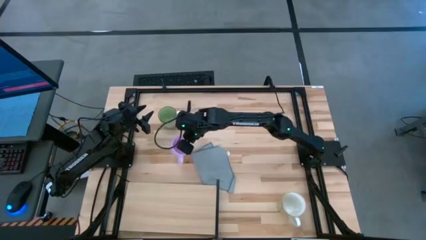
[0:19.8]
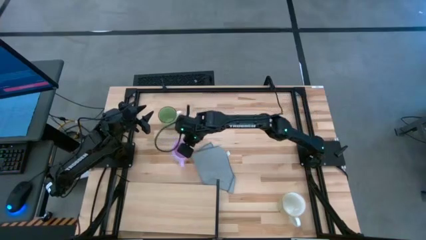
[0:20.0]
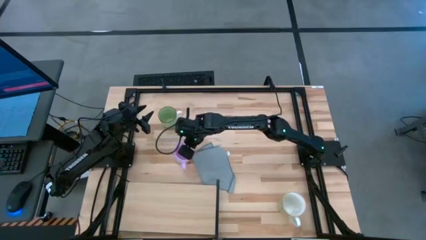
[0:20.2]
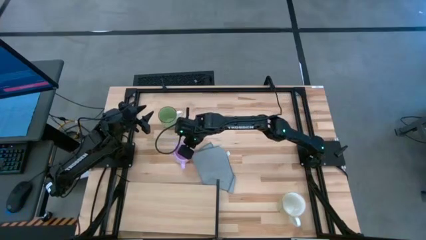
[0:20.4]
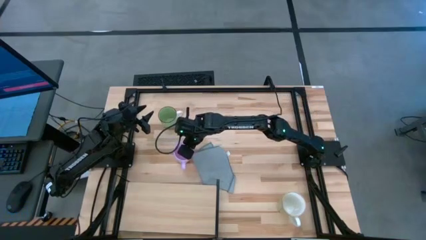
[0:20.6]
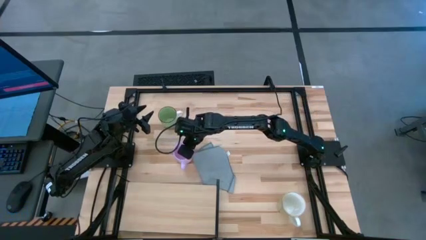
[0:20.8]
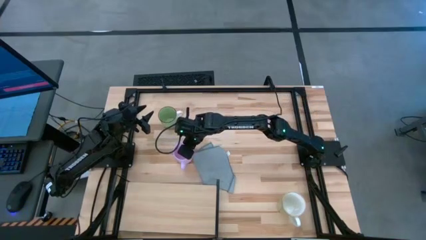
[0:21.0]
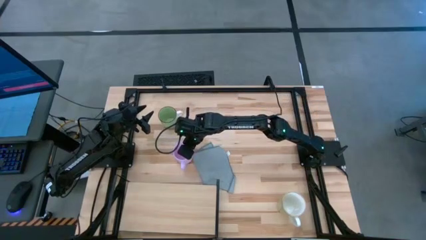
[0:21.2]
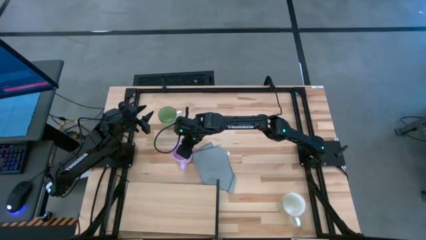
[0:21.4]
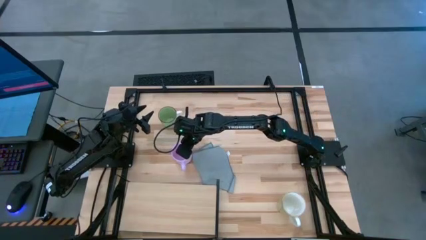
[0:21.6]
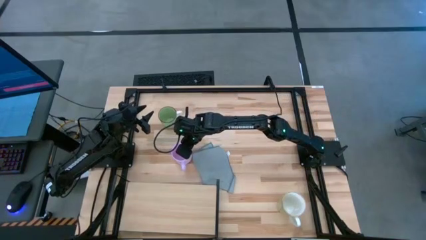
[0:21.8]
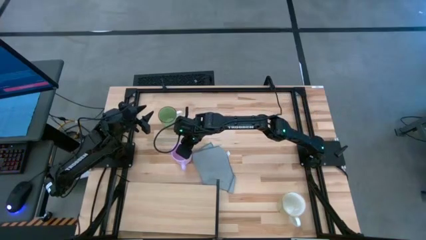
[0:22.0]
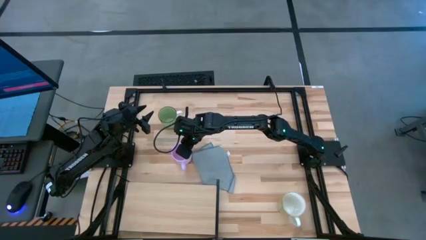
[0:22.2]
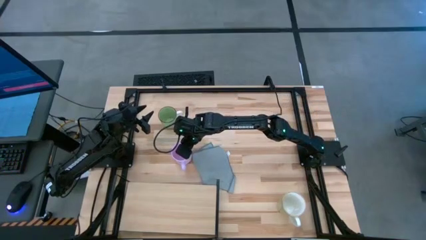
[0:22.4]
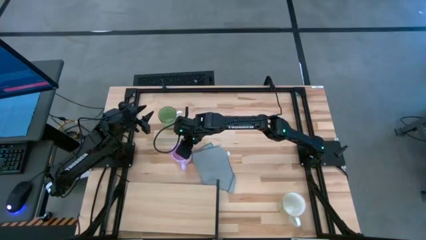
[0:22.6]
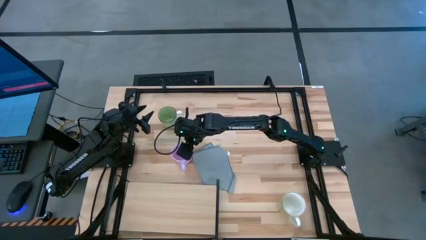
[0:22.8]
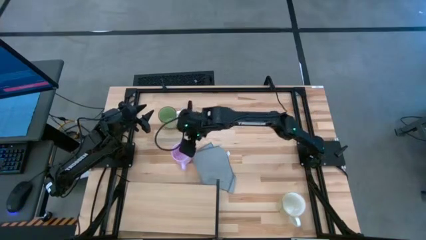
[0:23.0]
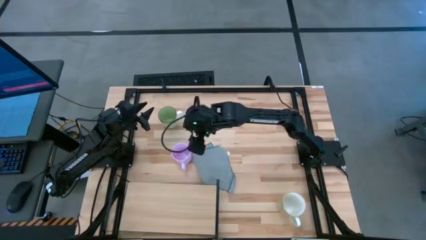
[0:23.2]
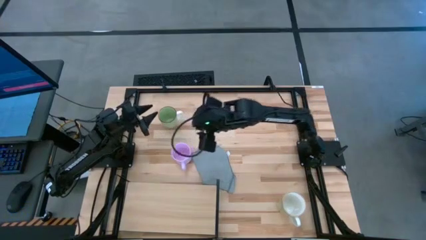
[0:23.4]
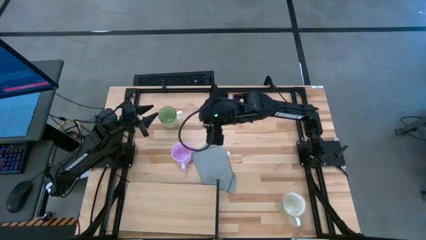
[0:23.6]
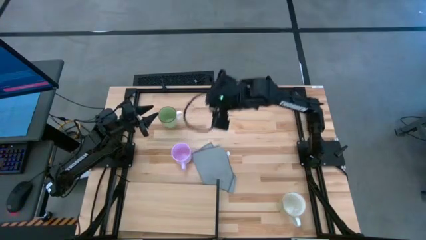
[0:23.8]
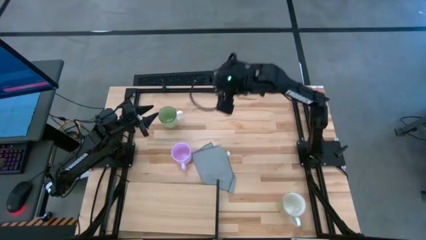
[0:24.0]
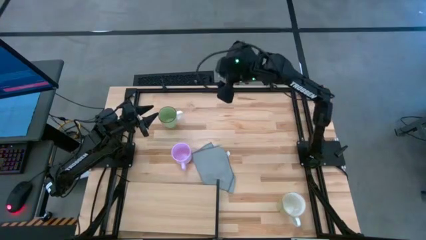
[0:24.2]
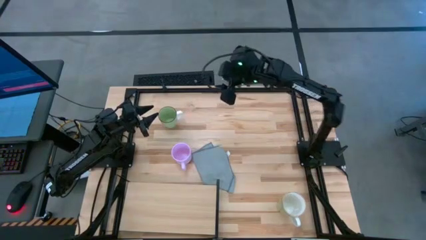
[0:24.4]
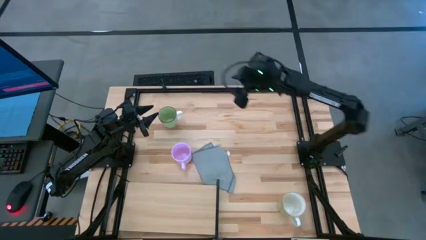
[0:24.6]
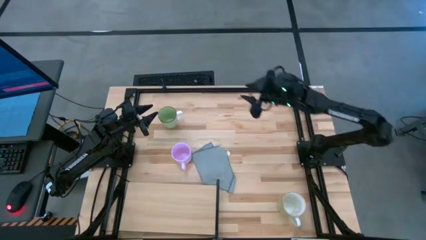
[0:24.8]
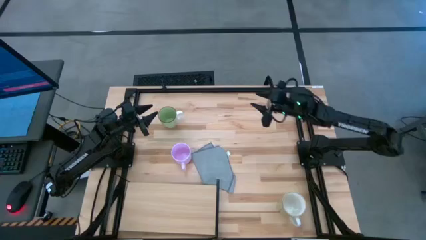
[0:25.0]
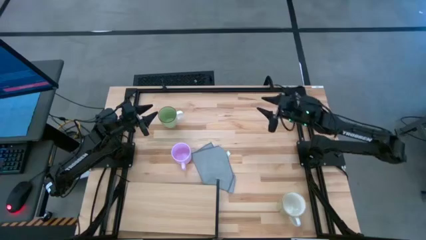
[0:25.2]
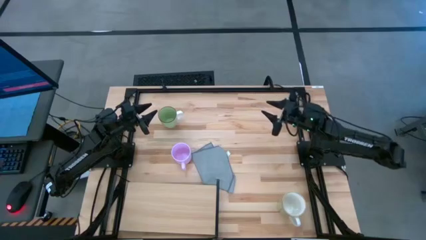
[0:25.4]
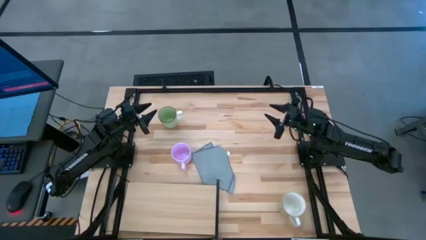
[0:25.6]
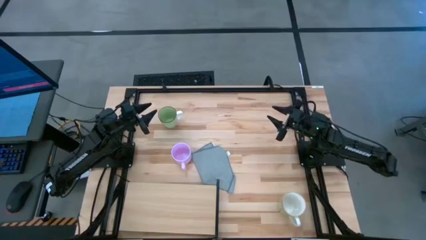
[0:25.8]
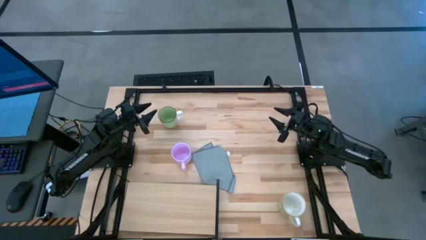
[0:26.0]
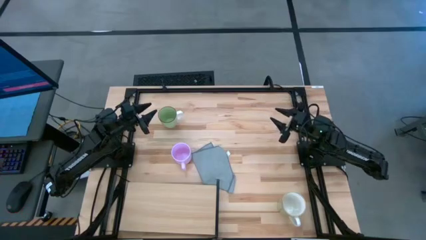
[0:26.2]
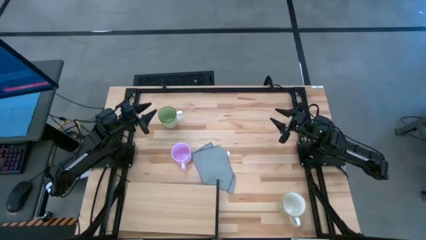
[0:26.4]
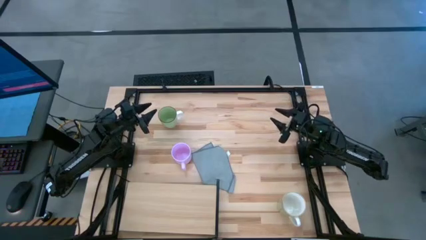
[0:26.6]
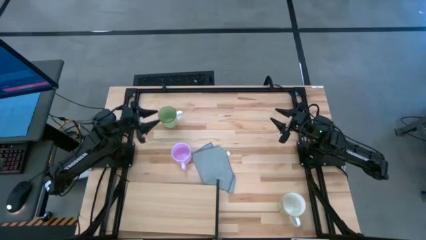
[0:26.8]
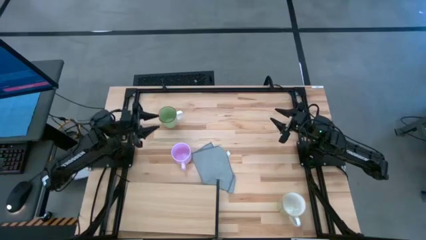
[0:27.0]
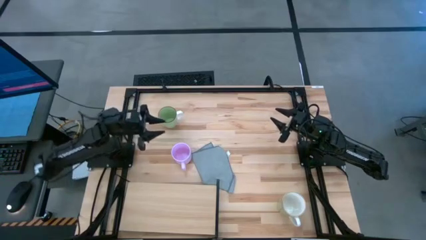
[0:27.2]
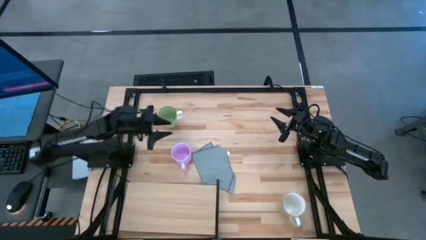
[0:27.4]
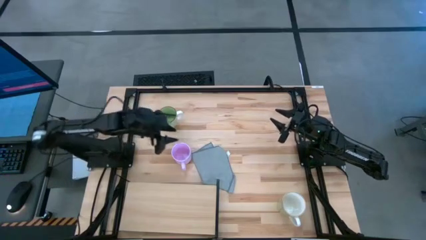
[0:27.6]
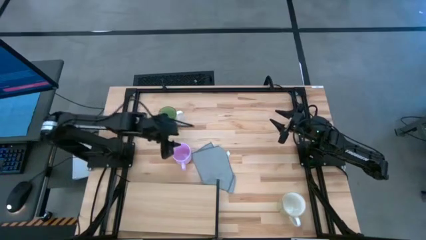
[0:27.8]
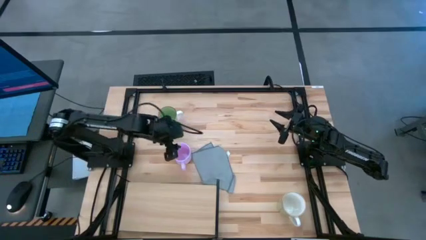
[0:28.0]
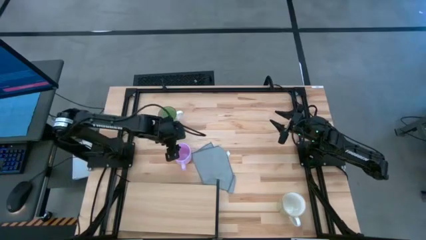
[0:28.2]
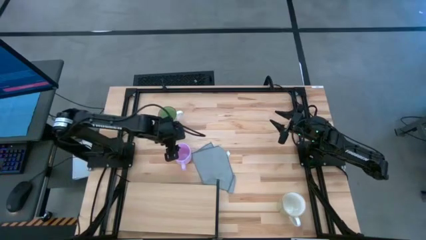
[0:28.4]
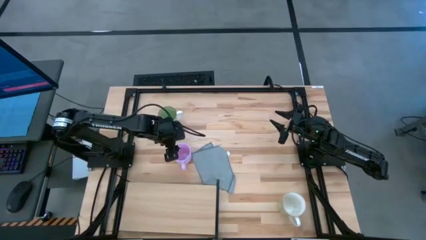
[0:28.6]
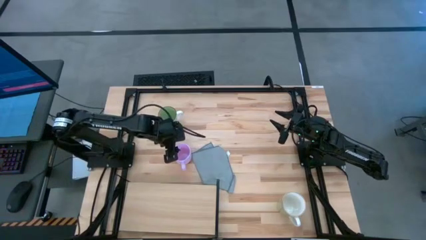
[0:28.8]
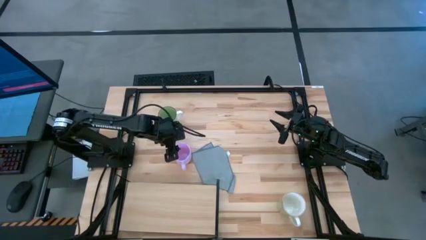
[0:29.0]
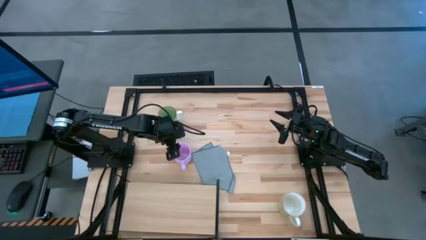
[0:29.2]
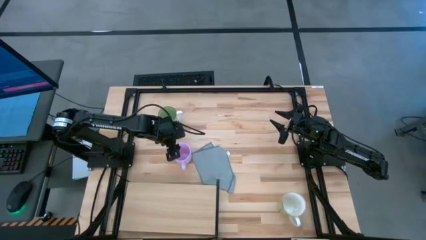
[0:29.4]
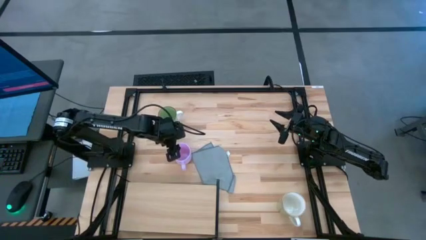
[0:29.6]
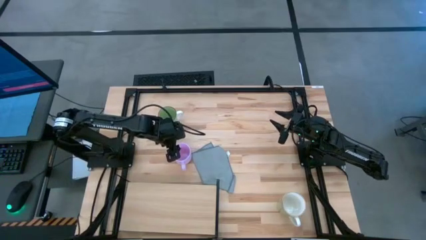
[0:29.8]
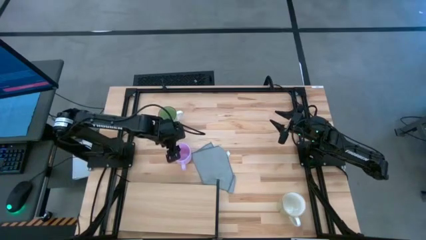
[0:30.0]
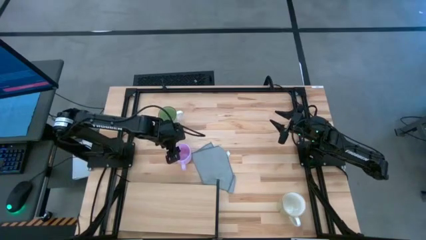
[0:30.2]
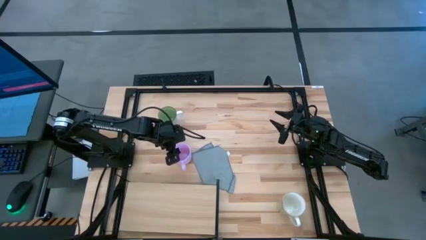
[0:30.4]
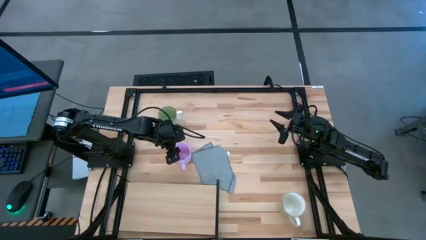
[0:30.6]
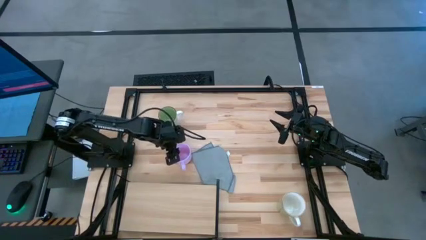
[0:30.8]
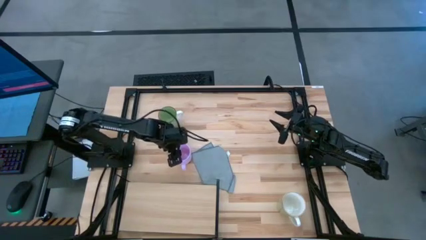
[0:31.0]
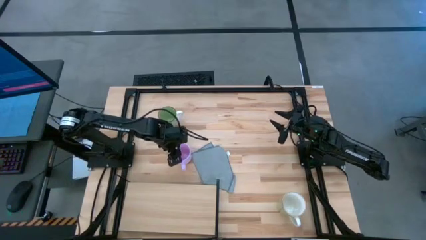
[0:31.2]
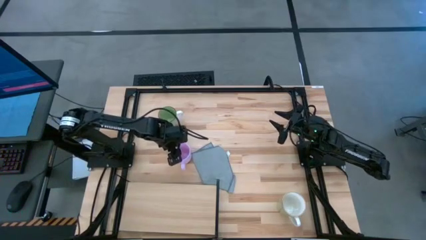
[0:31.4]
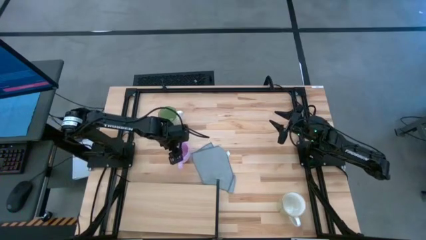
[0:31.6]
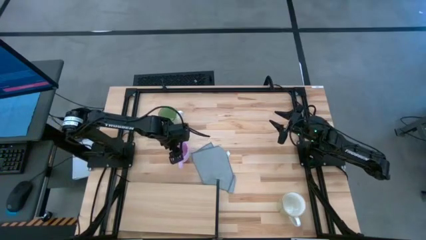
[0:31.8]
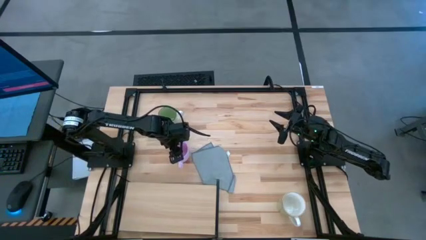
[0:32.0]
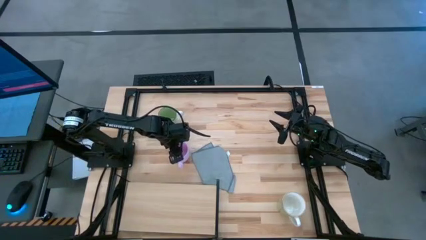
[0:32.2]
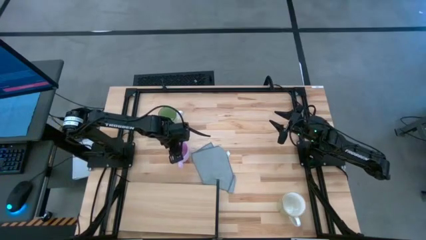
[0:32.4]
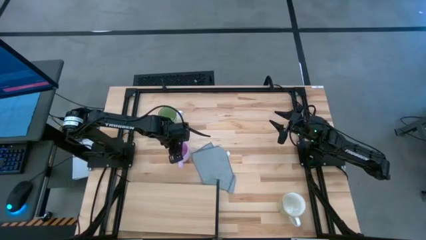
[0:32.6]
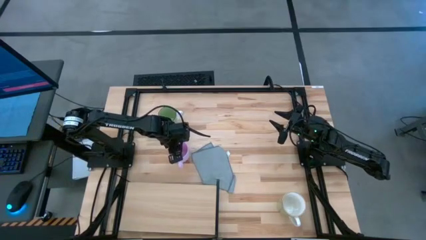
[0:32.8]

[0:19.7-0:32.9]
Task: Stack small to large cups/mugs on shelf
Put the pink mug on the shelf
